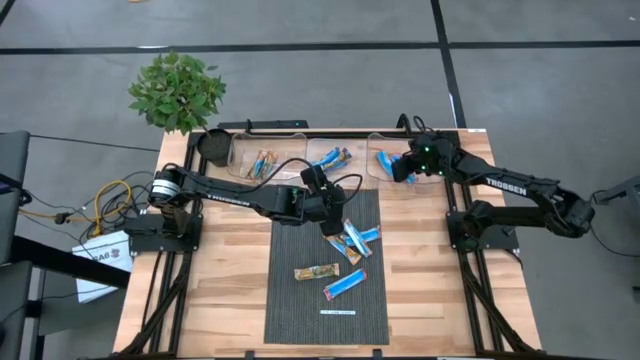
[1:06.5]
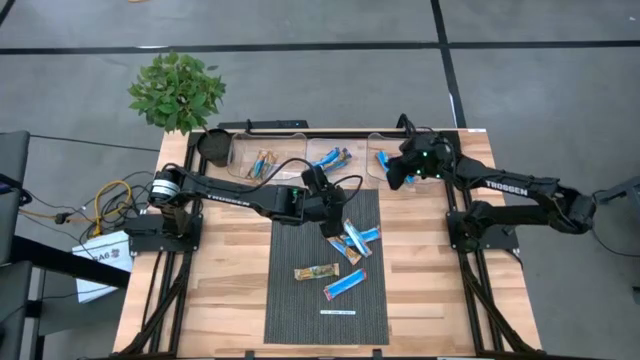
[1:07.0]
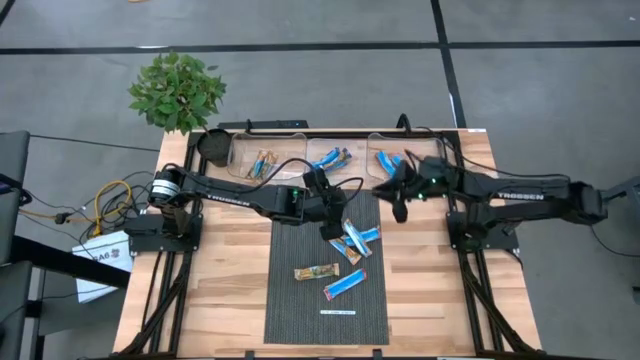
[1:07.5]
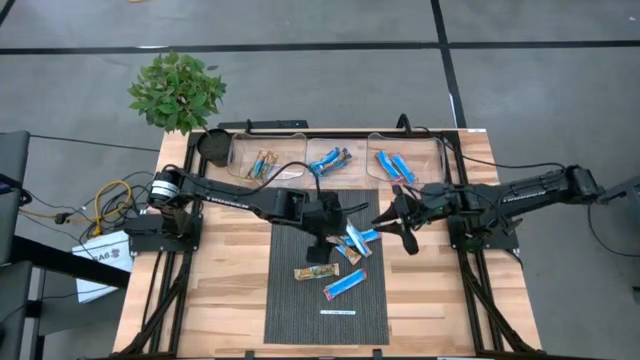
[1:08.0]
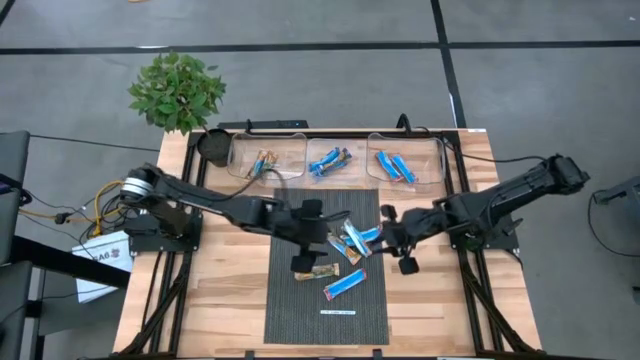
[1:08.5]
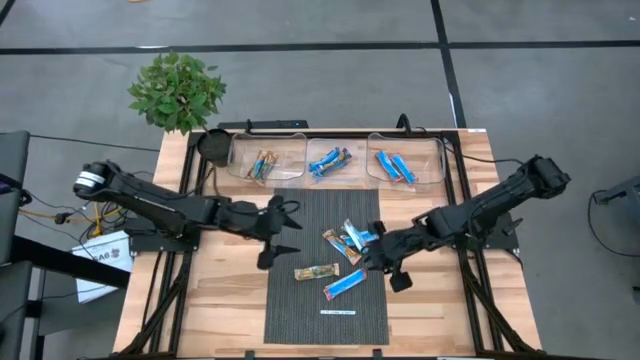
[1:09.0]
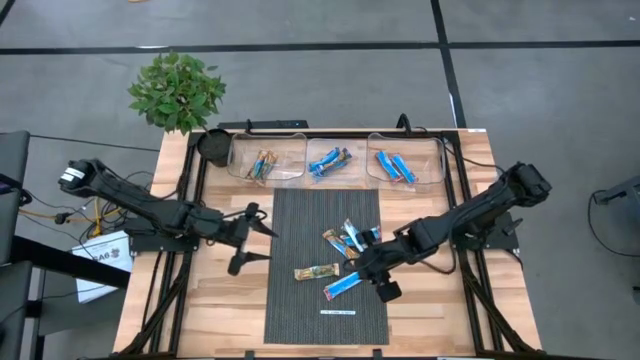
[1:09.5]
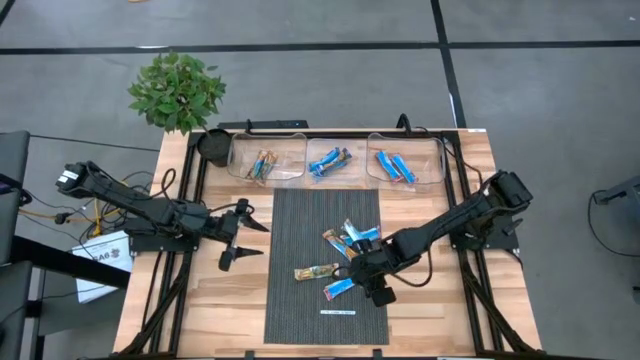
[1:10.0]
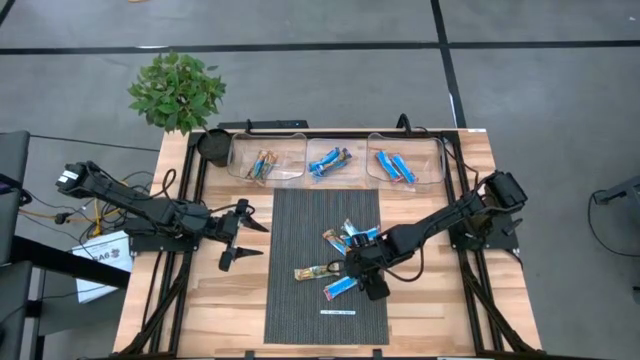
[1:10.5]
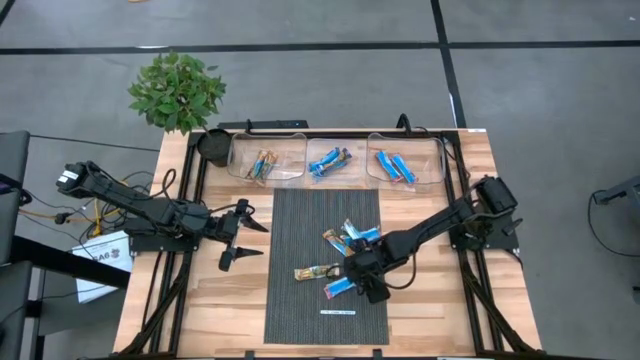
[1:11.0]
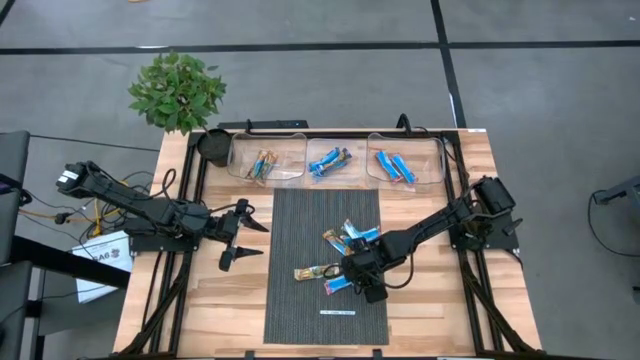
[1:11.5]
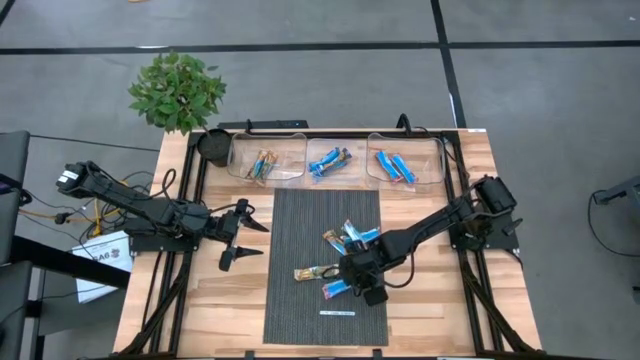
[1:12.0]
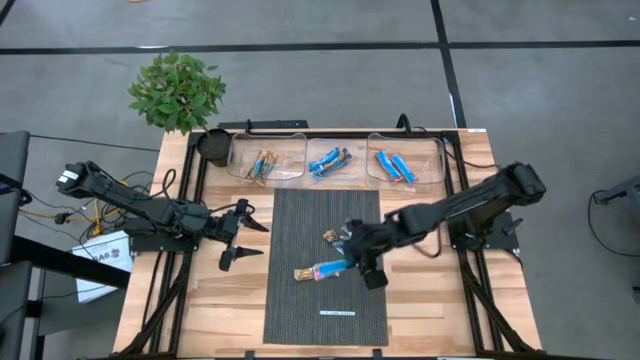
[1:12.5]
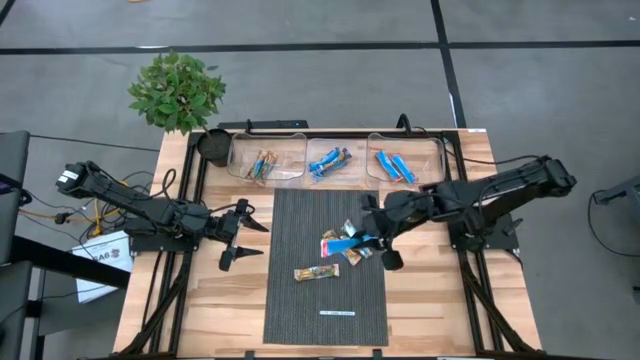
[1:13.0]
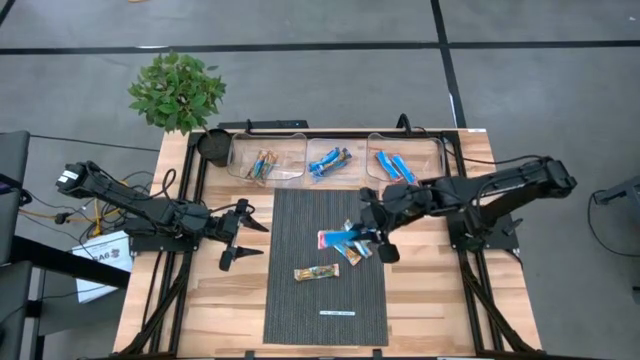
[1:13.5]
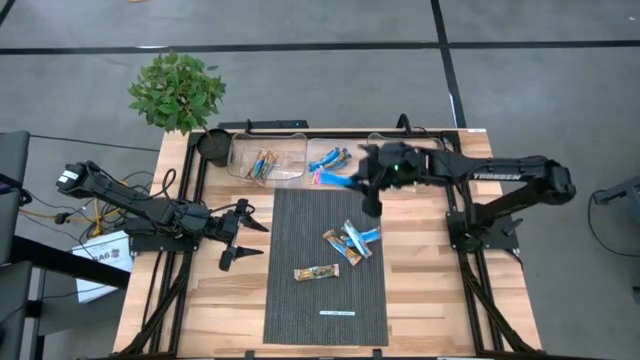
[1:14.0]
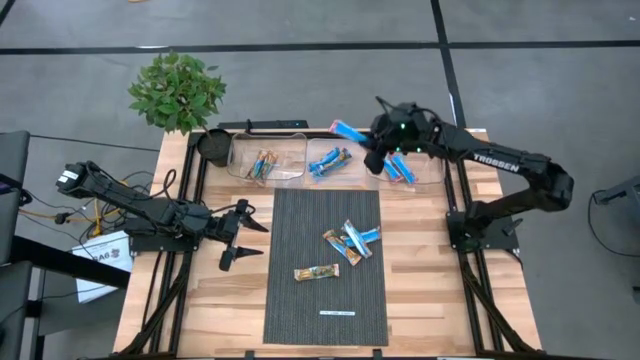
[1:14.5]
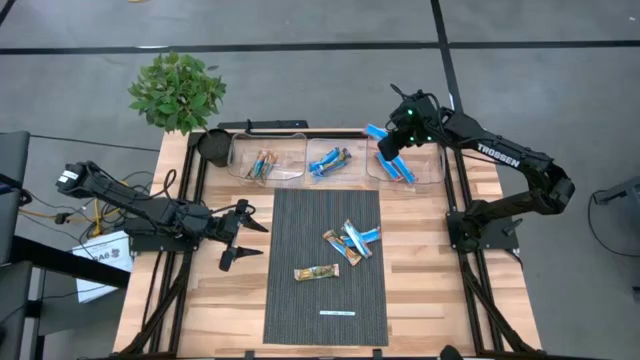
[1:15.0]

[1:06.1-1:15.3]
Task: Pick and place Granola Bars by type
Put the red granola bar into the right transparent bin

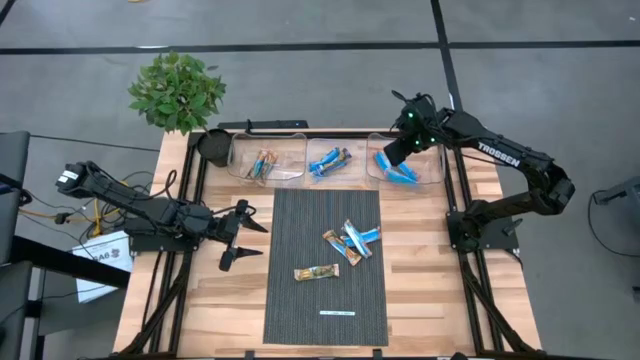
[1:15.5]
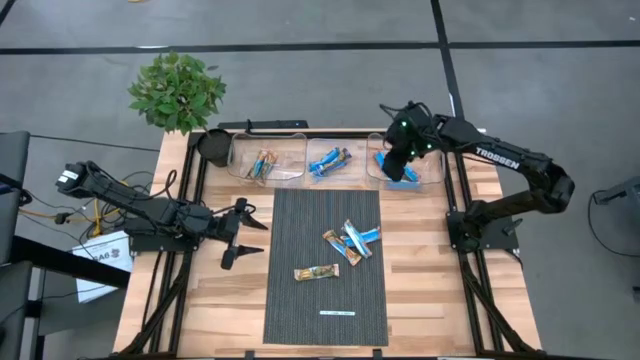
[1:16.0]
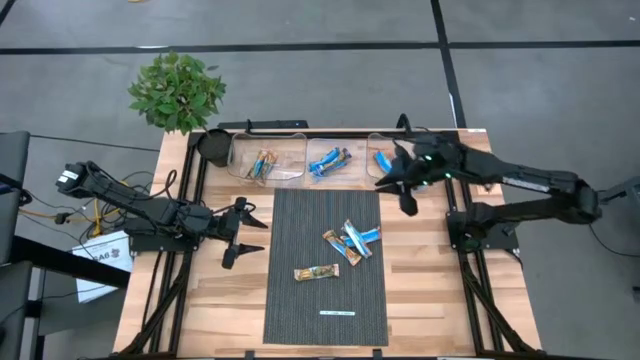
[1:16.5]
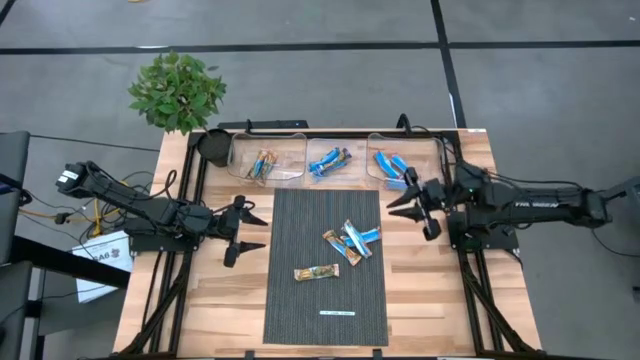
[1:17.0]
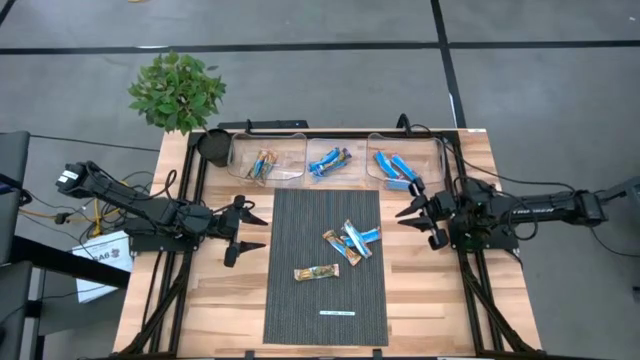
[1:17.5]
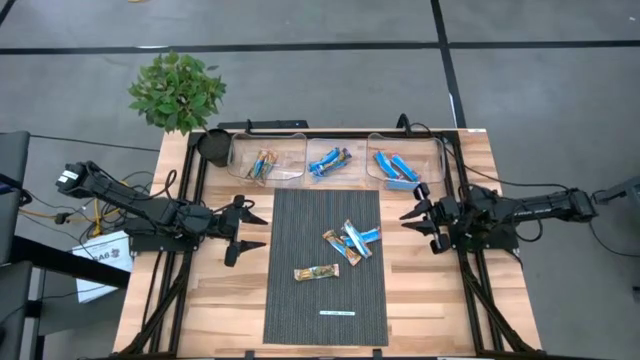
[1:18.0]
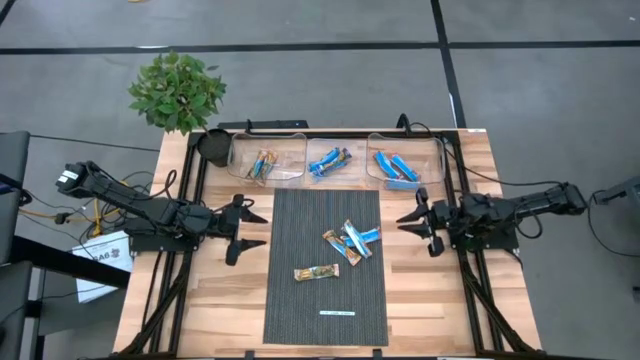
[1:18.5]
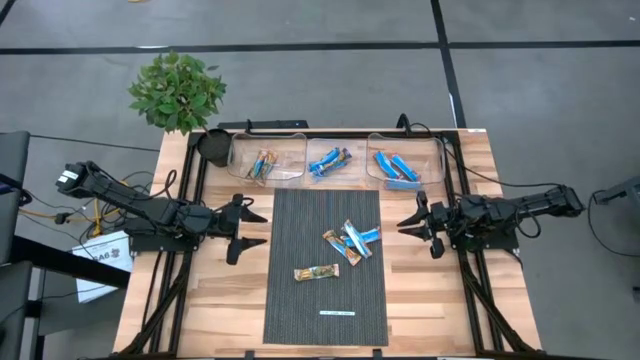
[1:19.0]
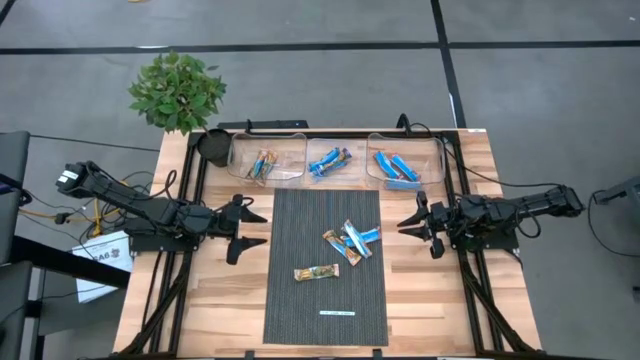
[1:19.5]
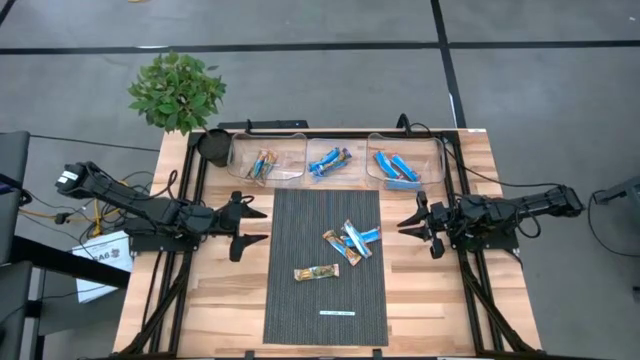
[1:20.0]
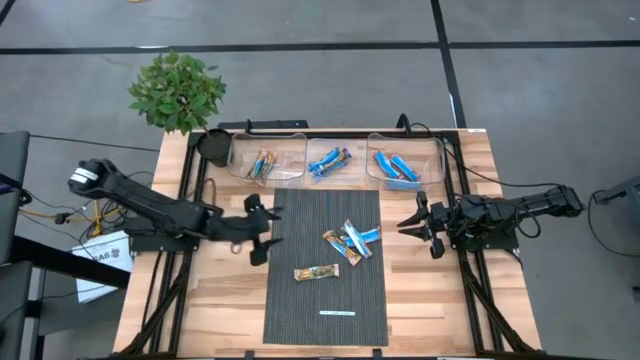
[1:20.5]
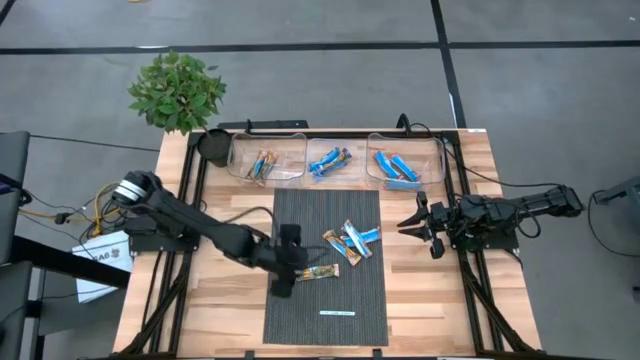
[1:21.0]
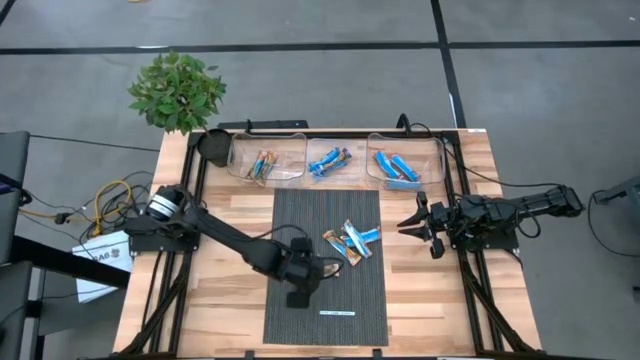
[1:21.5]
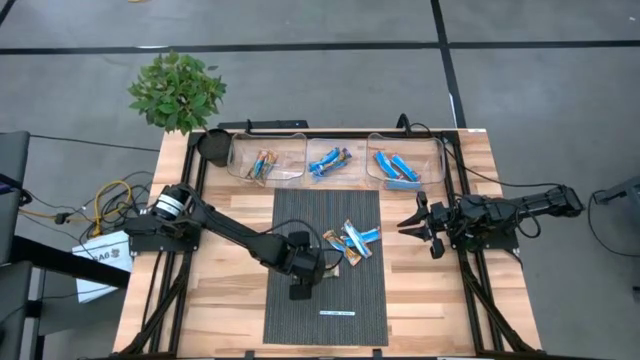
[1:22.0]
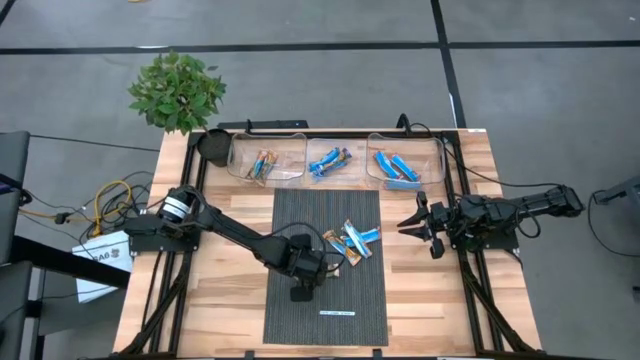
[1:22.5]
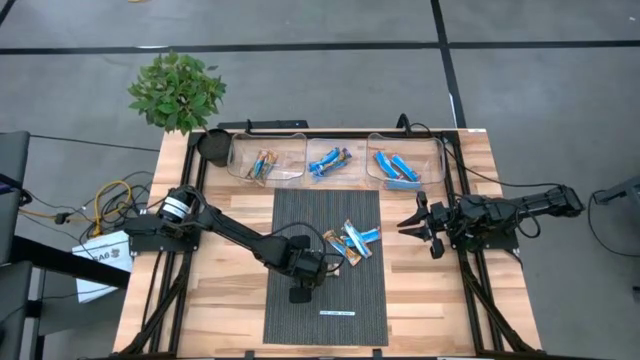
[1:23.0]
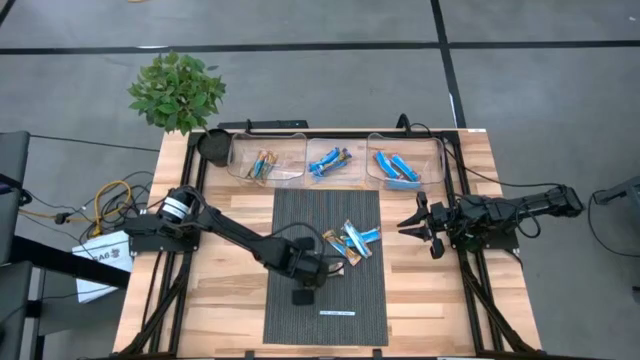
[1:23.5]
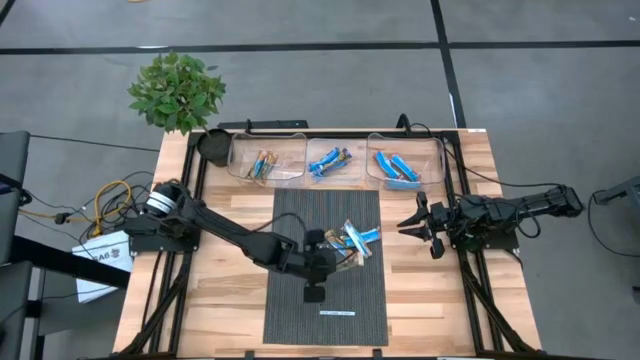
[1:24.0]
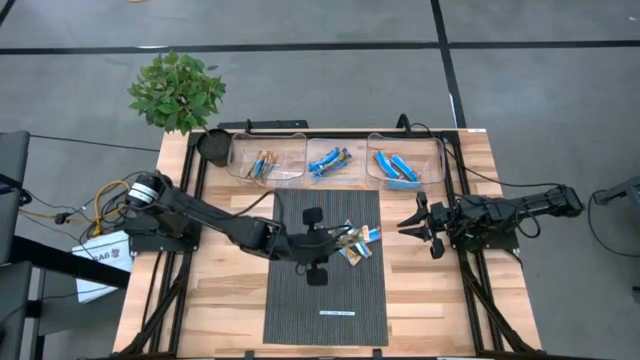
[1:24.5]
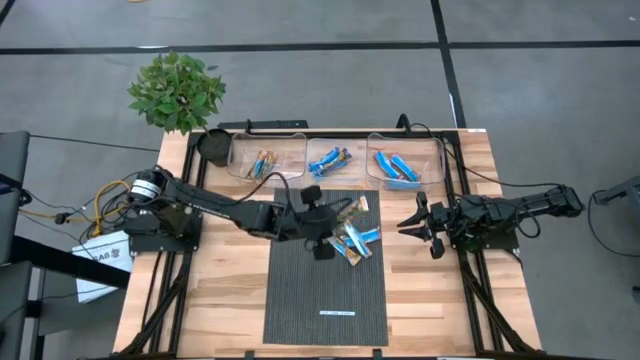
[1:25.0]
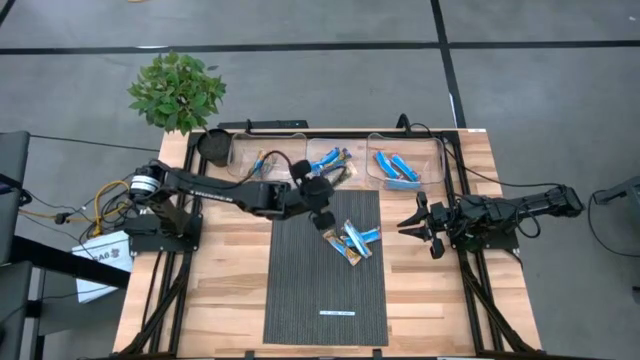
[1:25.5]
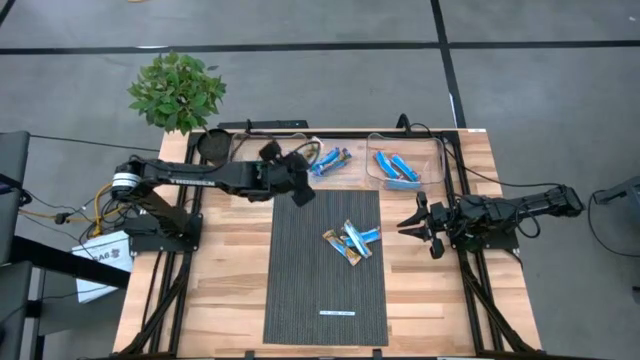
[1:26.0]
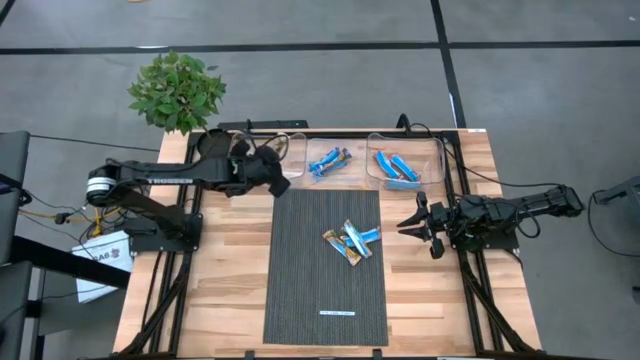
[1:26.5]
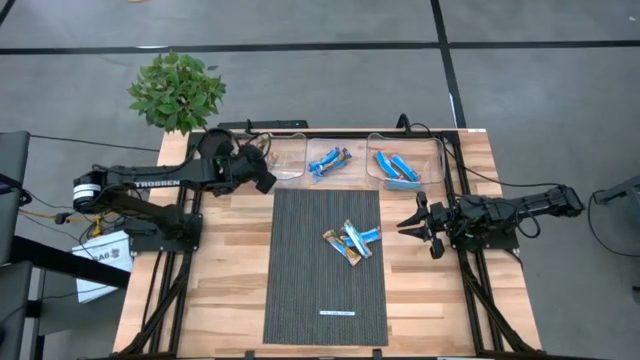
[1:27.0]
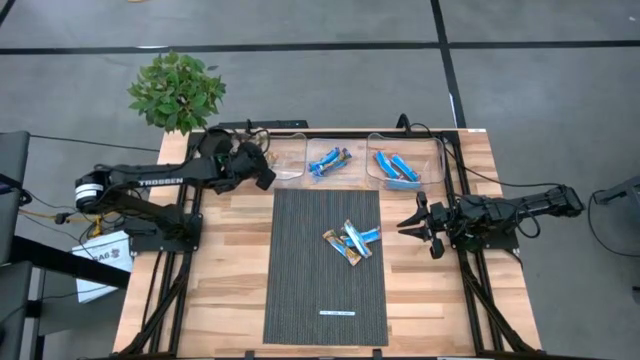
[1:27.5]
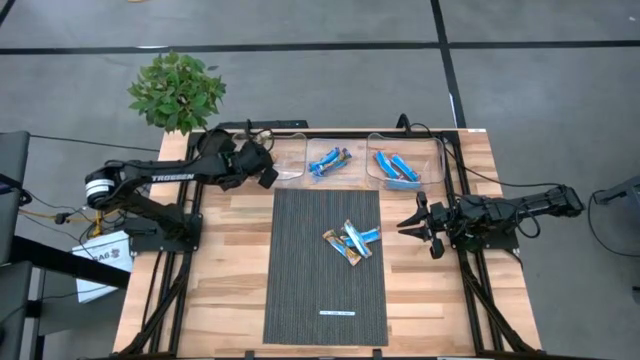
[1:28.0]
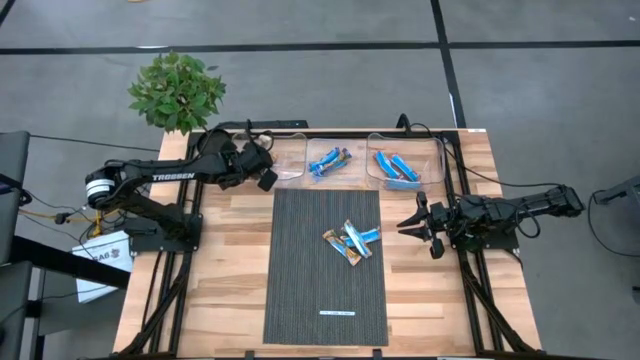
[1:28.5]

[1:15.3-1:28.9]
Put the yellow granola bar into the left transparent bin
